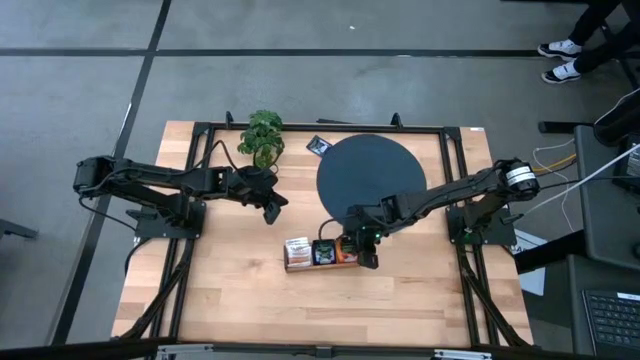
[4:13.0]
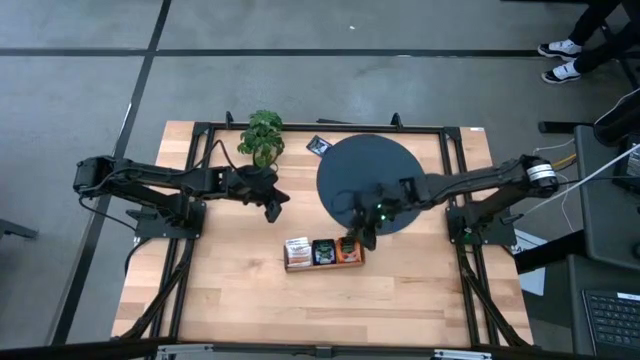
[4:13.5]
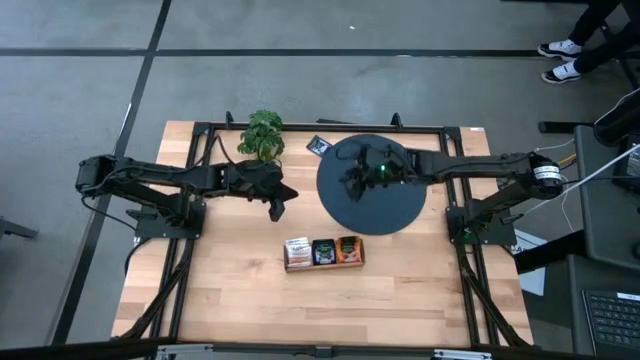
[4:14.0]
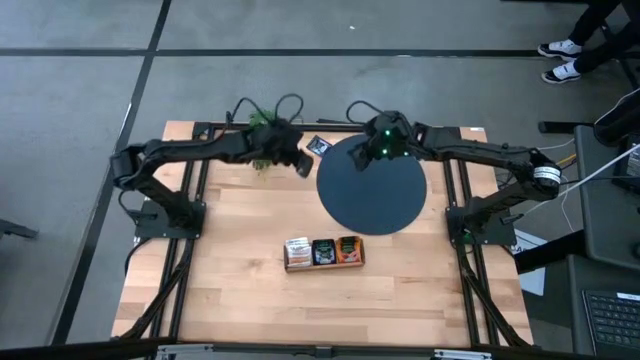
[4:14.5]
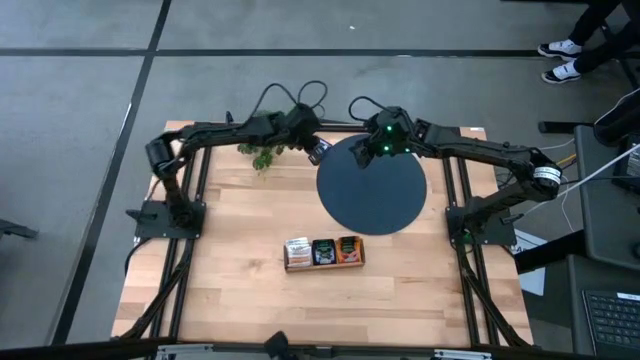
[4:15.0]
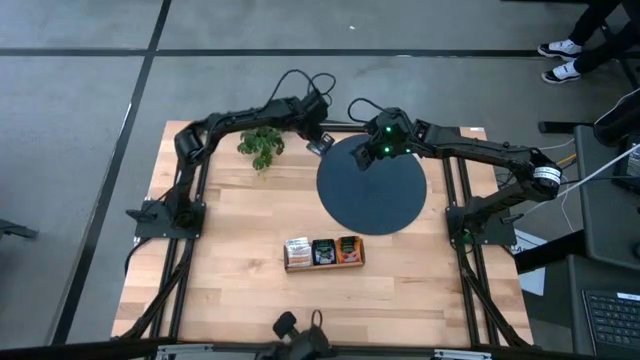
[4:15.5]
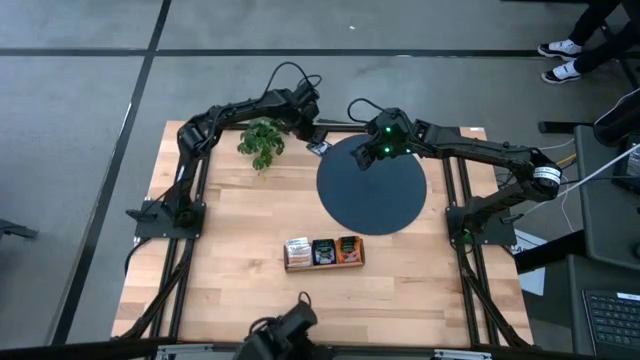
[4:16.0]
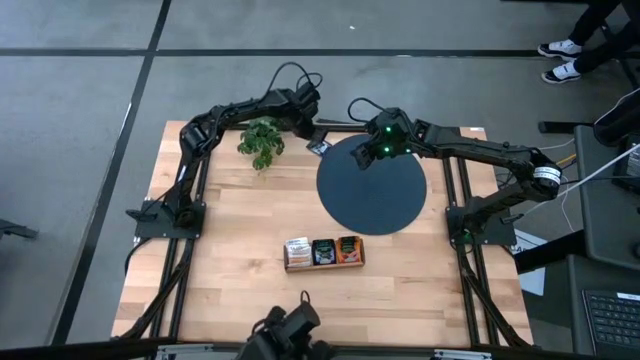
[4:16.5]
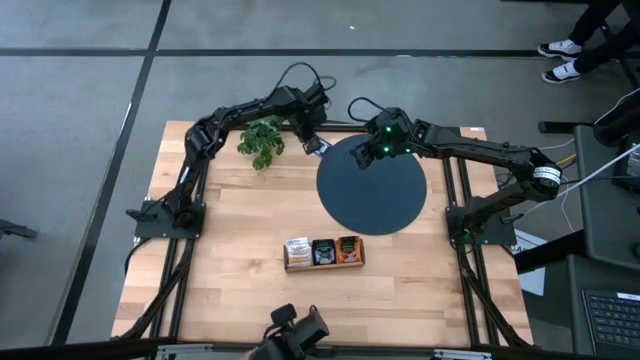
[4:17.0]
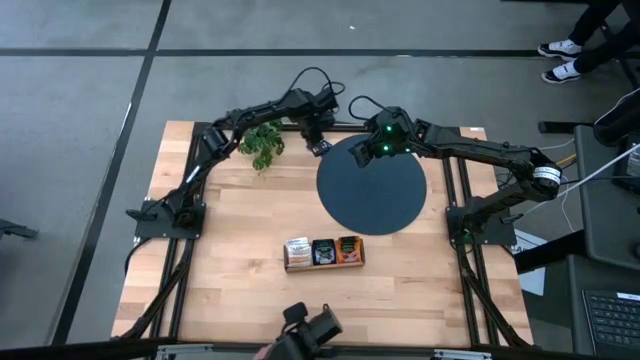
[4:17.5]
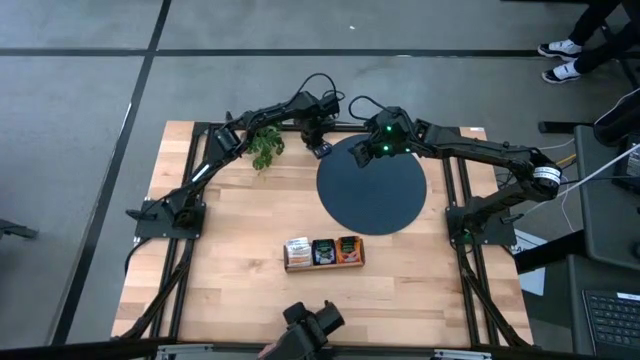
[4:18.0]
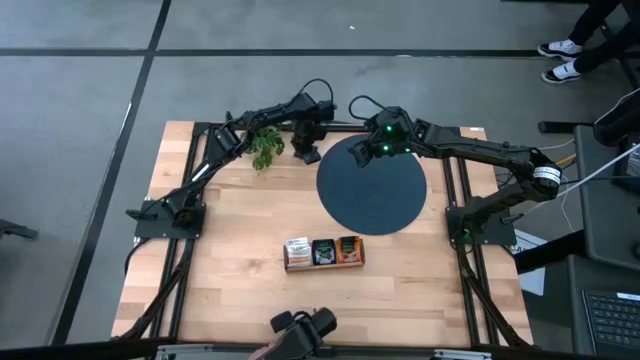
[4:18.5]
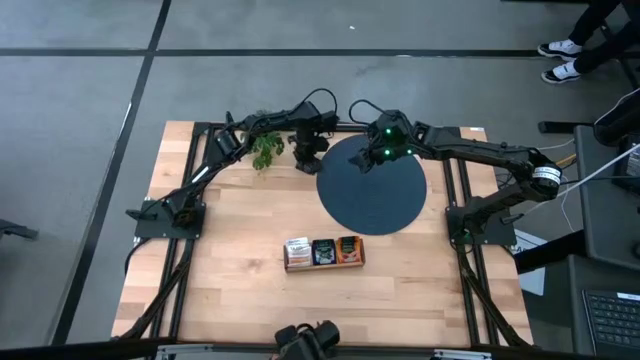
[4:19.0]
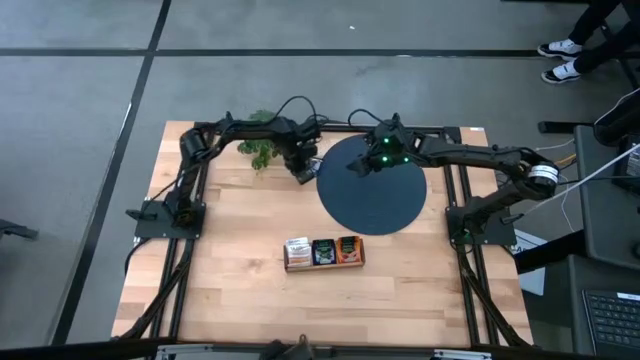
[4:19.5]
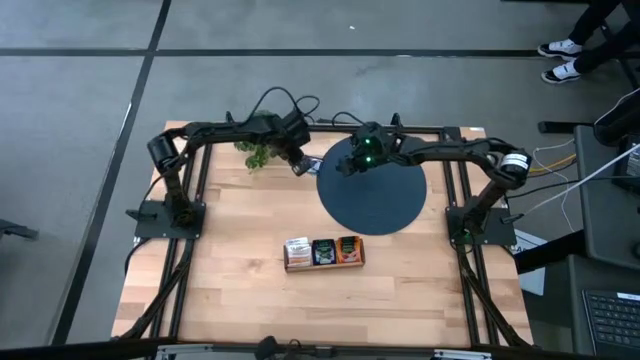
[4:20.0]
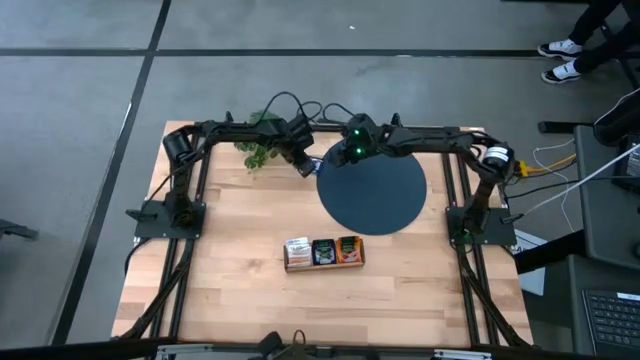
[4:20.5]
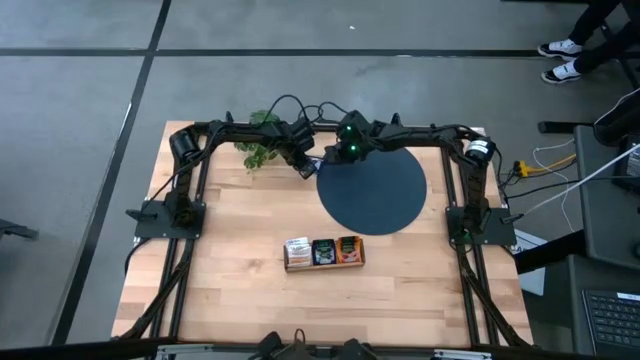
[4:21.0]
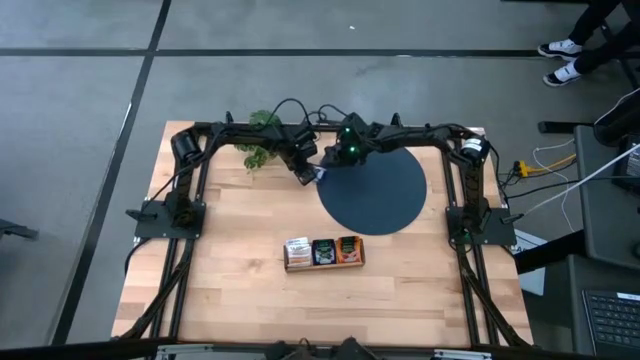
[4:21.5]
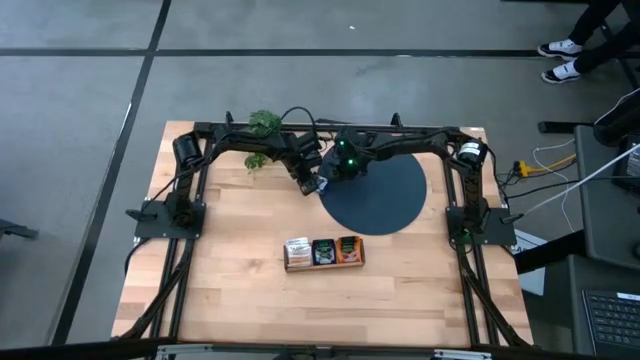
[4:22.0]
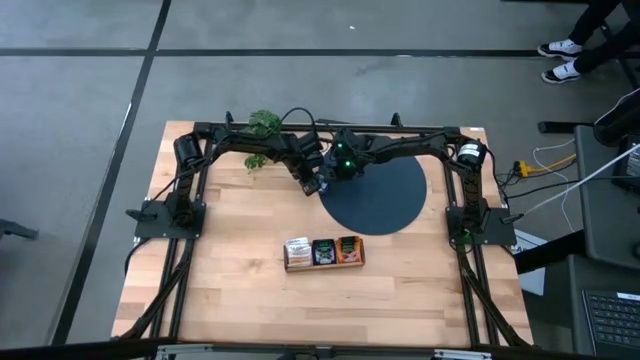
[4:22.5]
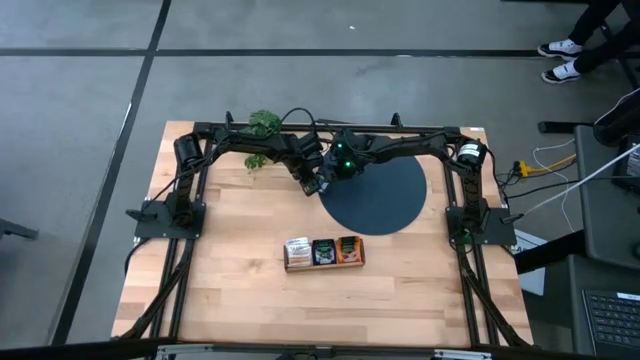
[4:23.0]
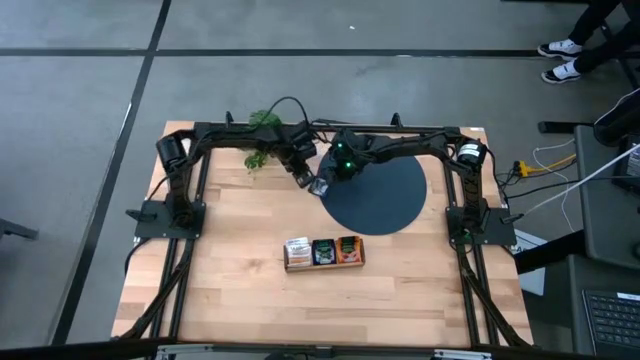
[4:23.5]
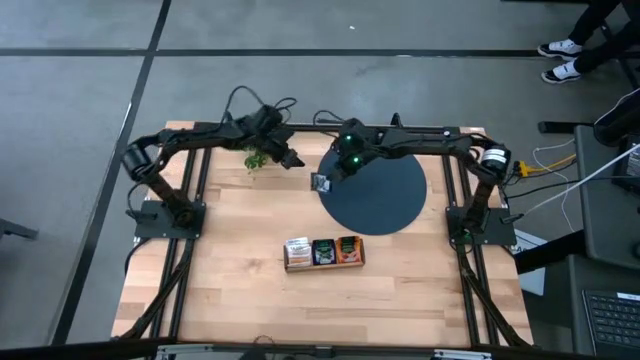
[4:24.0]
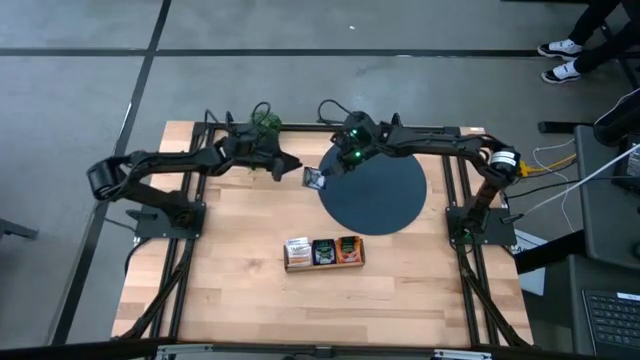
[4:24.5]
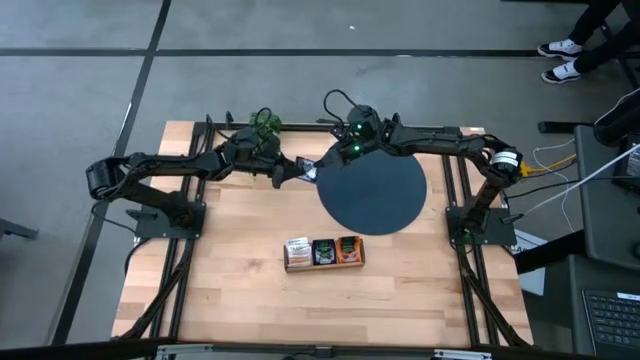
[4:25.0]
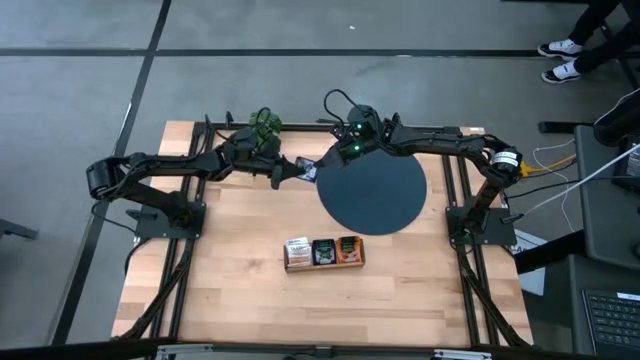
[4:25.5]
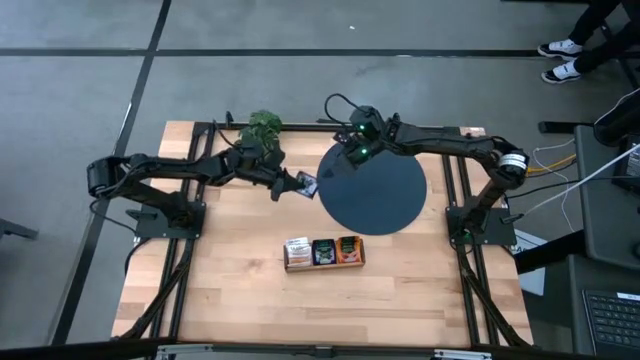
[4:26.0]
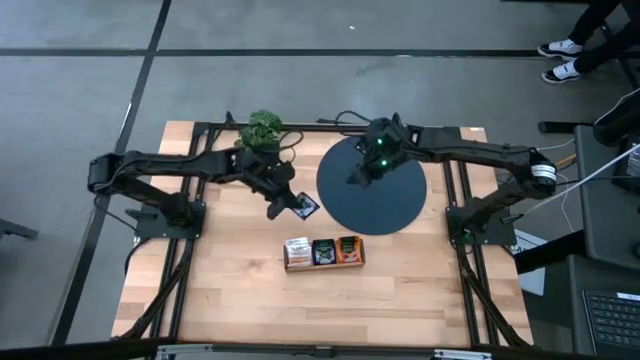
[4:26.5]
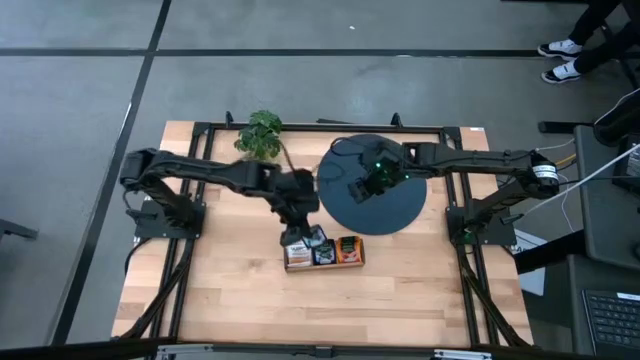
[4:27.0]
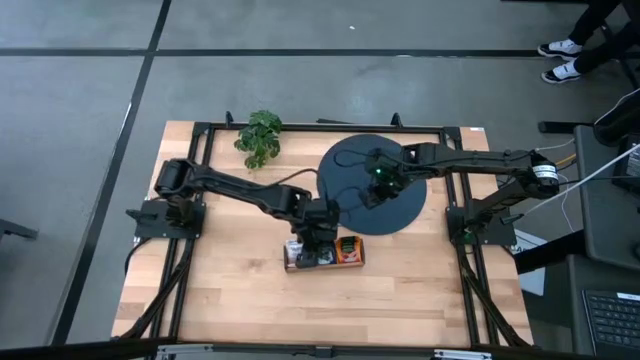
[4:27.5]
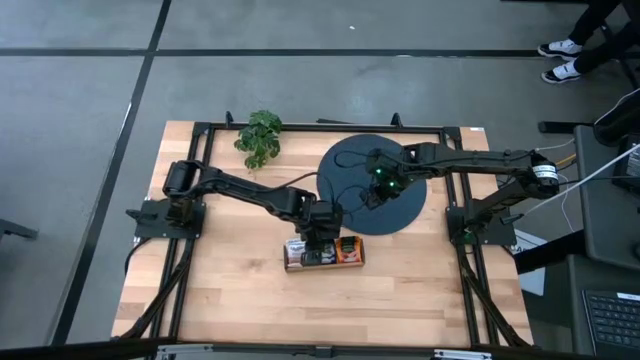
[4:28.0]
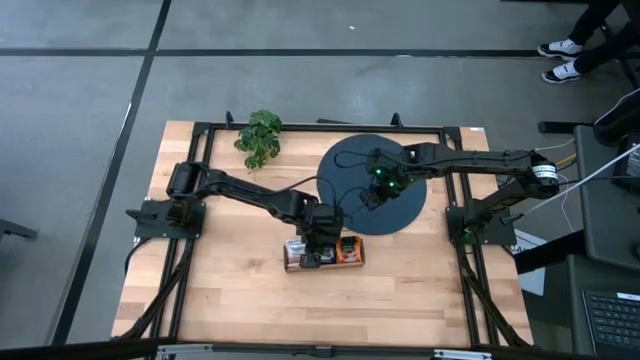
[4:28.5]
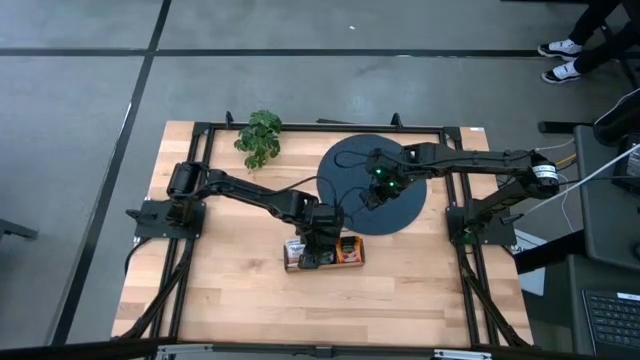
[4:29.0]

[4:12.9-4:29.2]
Task: Pick & Place Tea
Put the purple tea bag into the middle section of the wooden organizer

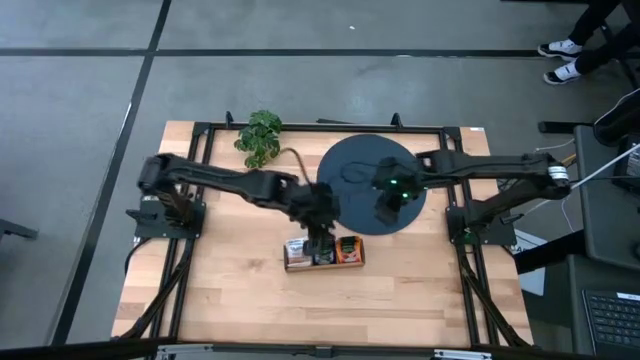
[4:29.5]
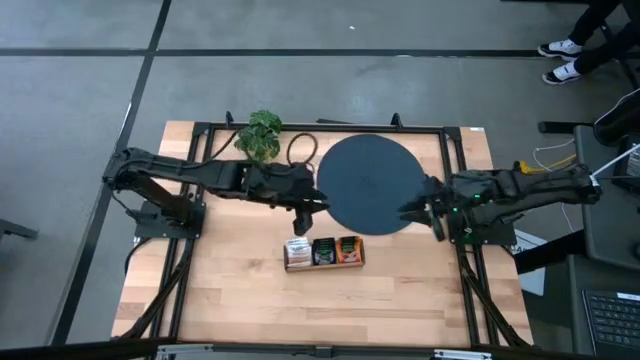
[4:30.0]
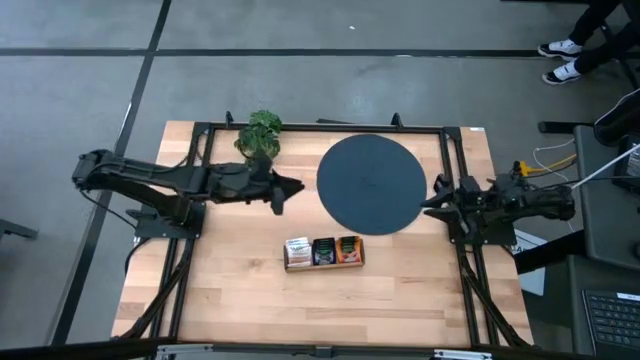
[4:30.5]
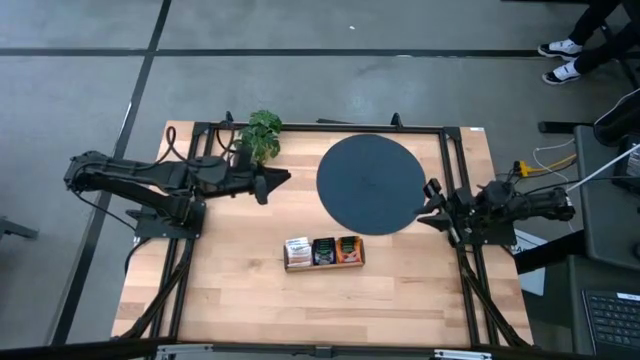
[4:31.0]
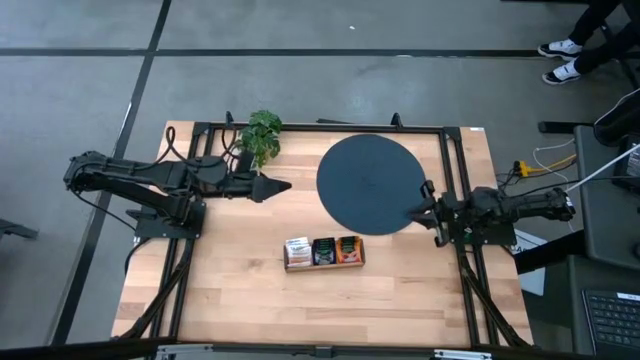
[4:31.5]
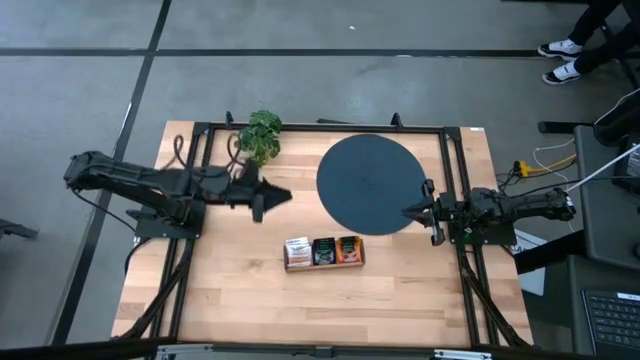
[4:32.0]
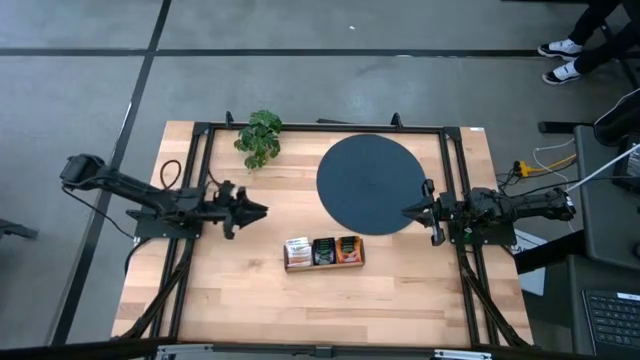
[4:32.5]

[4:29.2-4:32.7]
Return to Home Position

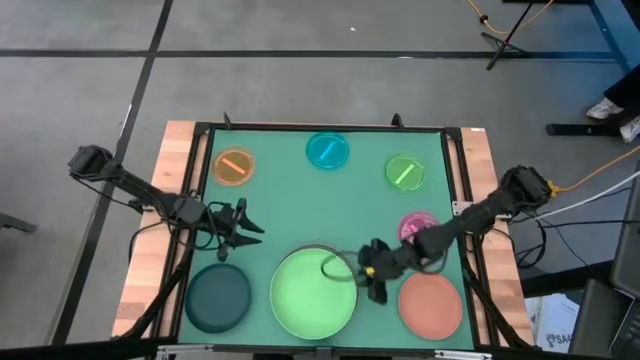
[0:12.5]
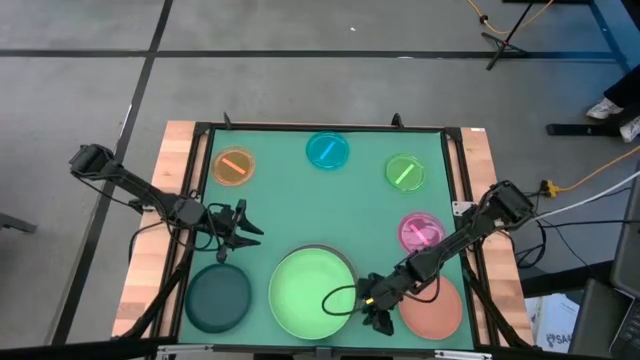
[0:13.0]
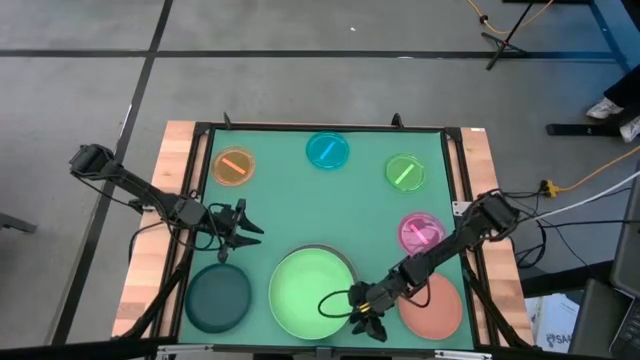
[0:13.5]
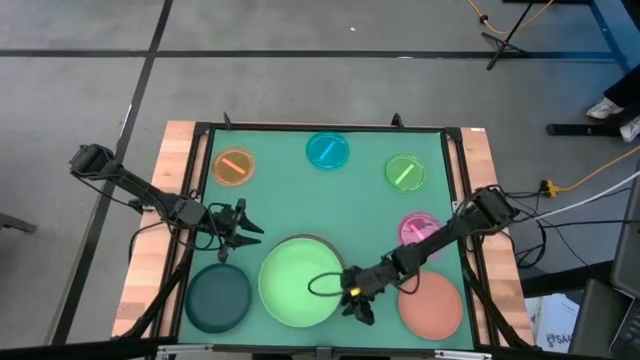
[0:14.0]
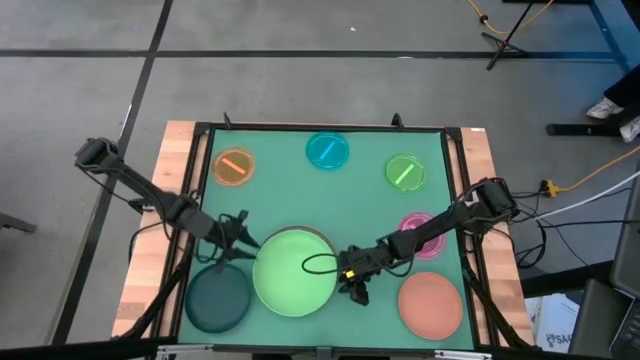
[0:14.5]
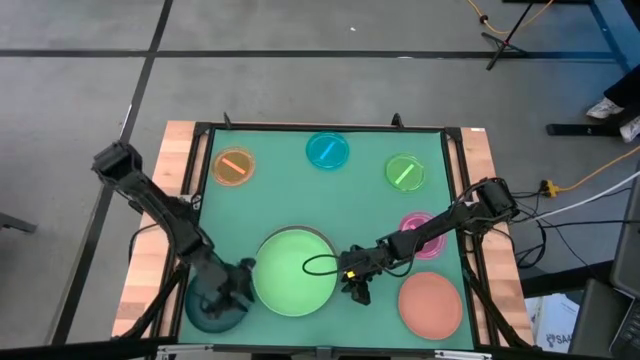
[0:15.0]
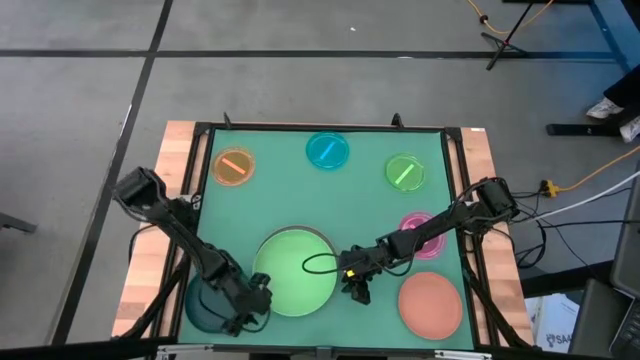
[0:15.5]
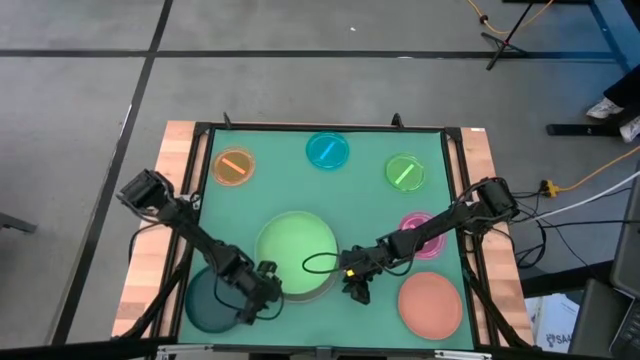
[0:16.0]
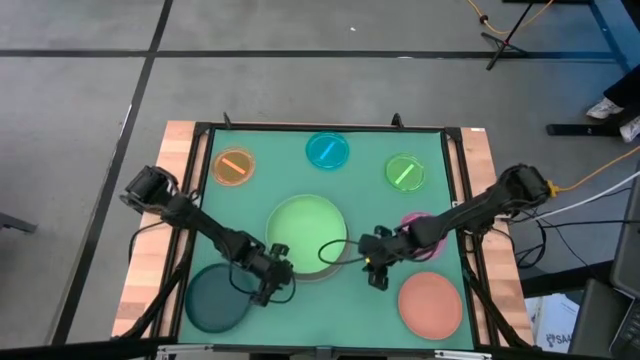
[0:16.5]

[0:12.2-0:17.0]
Task: Stack plastic plates
Move the stacked plate to the center of the table
